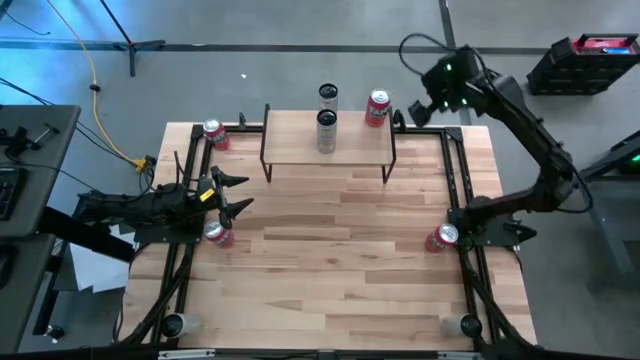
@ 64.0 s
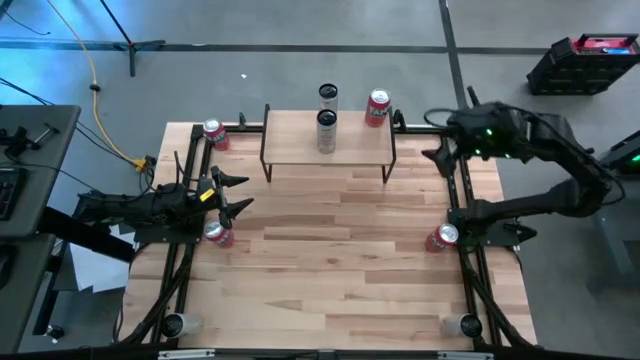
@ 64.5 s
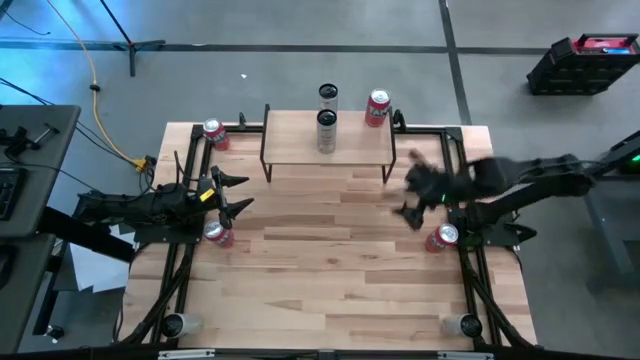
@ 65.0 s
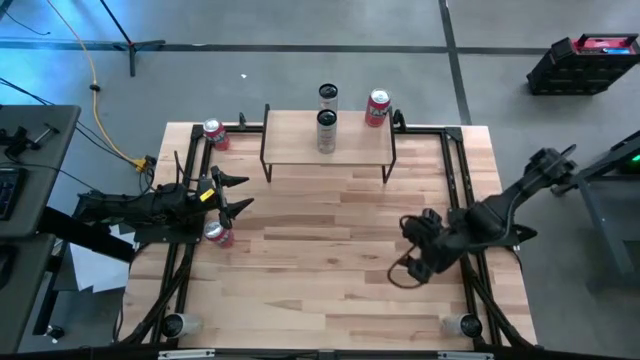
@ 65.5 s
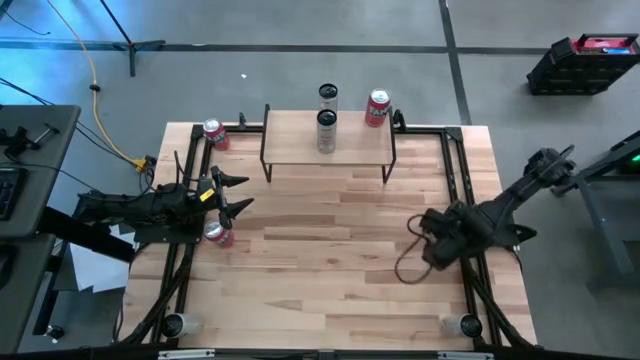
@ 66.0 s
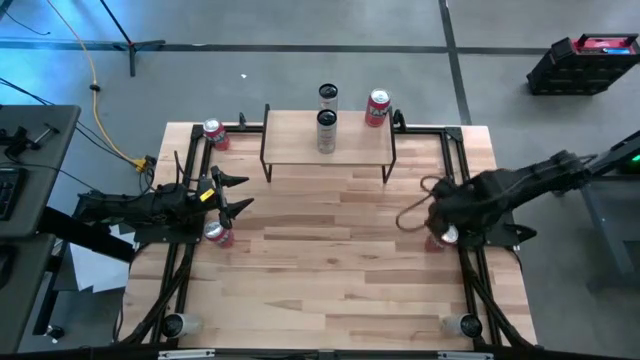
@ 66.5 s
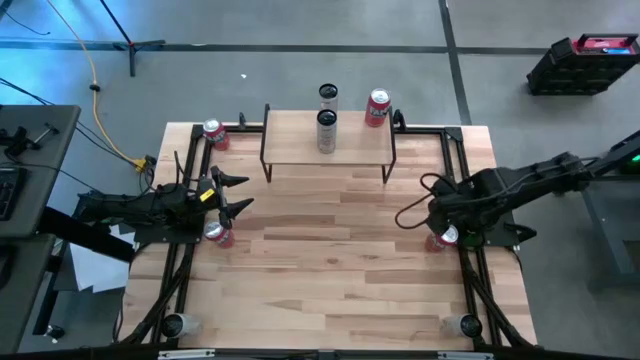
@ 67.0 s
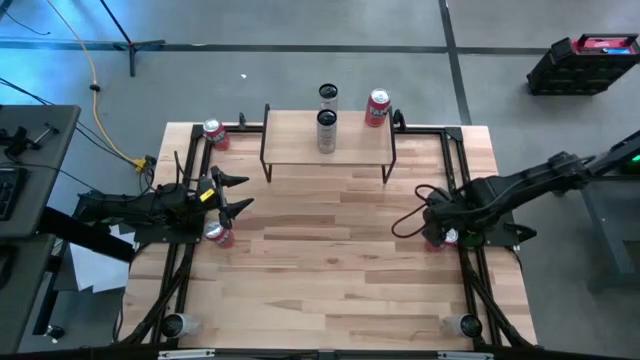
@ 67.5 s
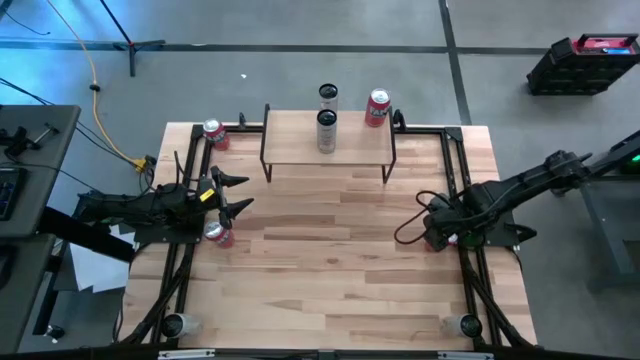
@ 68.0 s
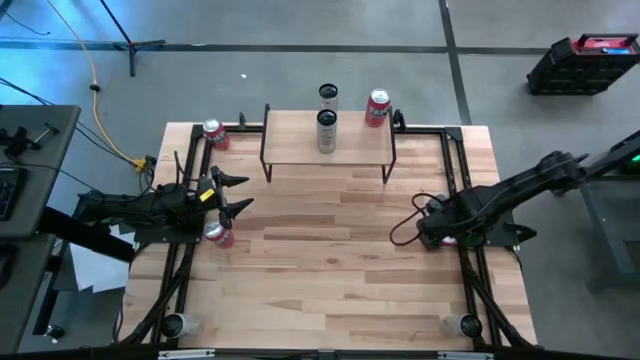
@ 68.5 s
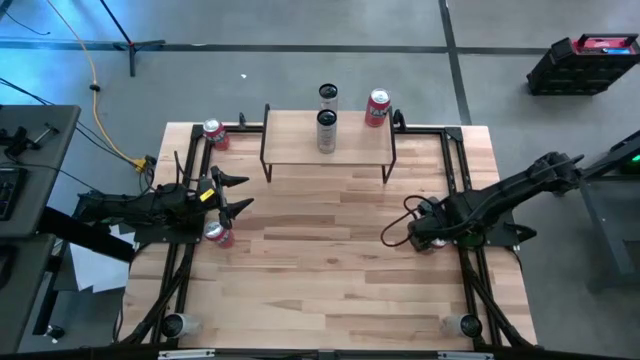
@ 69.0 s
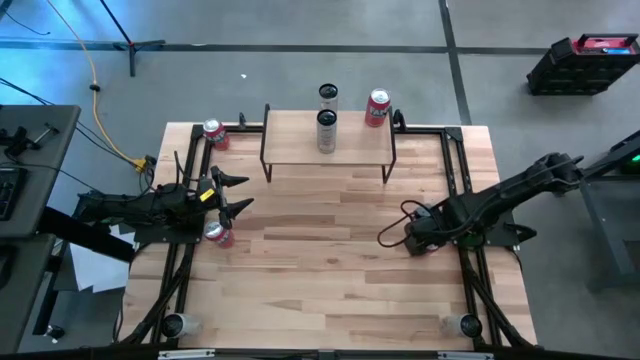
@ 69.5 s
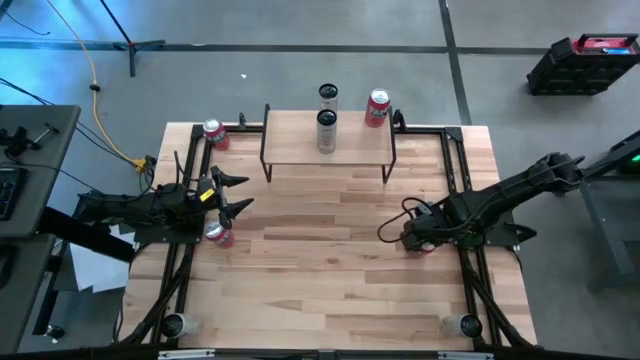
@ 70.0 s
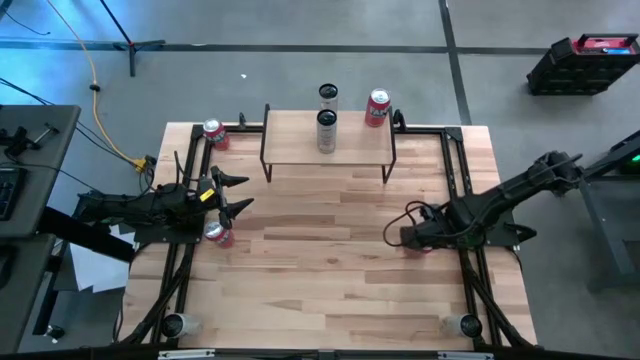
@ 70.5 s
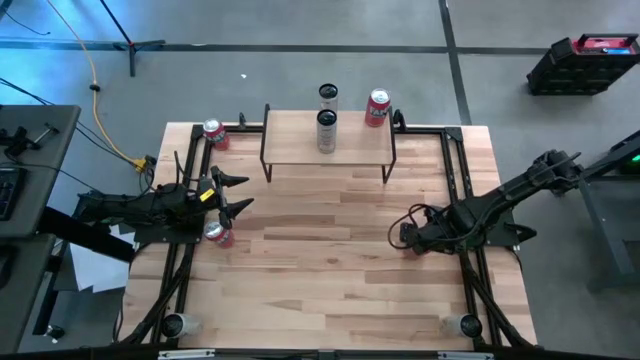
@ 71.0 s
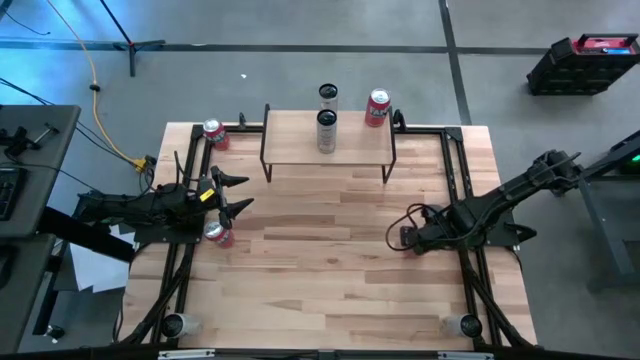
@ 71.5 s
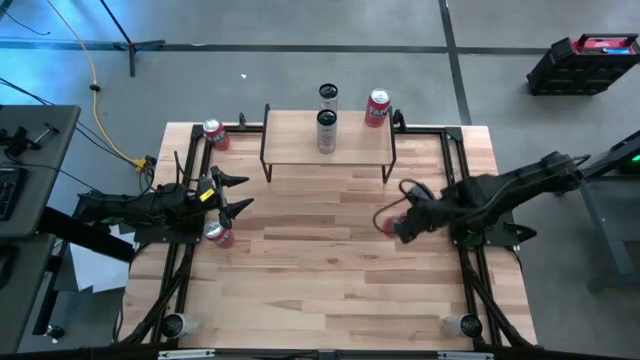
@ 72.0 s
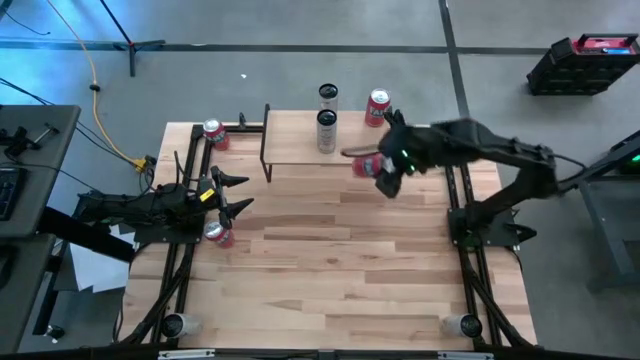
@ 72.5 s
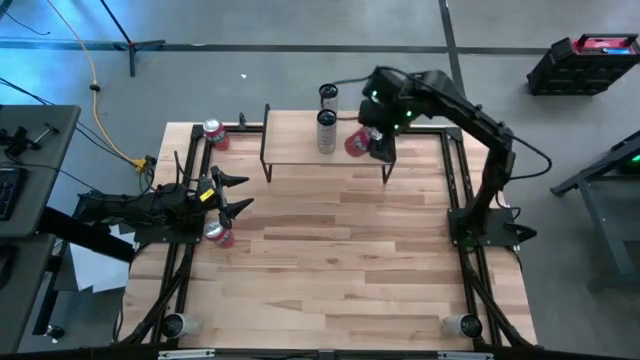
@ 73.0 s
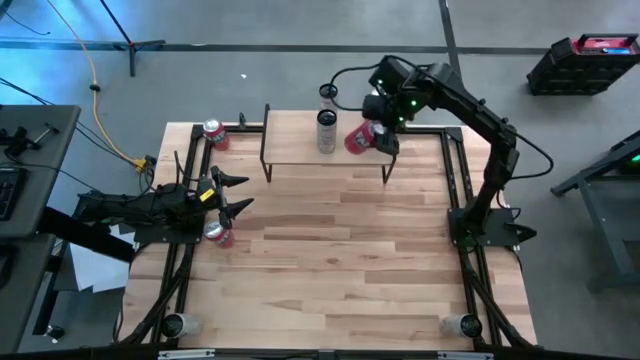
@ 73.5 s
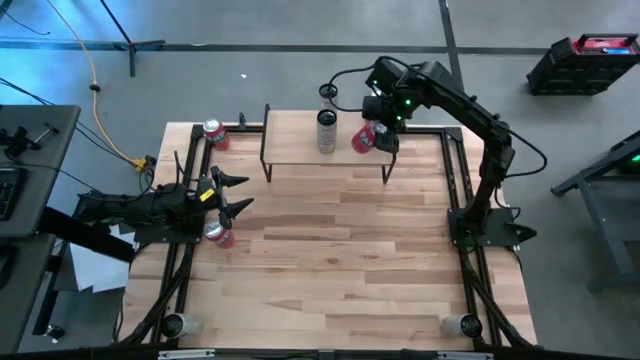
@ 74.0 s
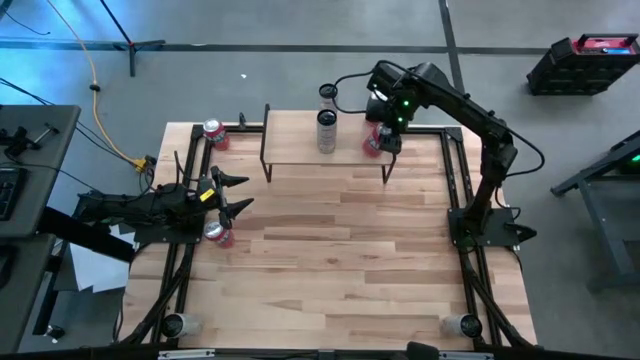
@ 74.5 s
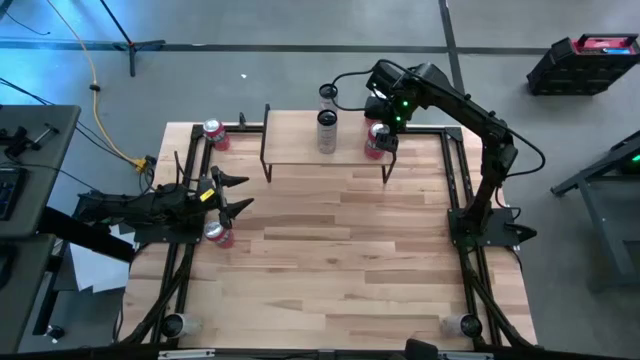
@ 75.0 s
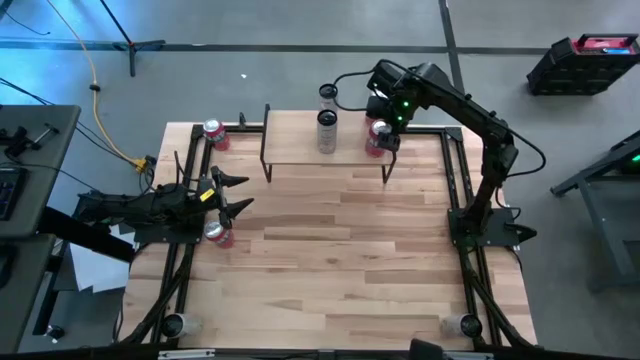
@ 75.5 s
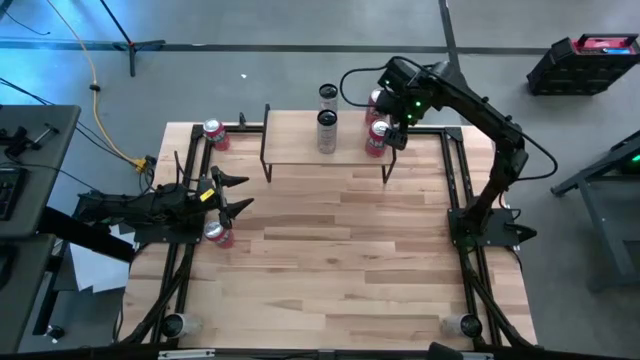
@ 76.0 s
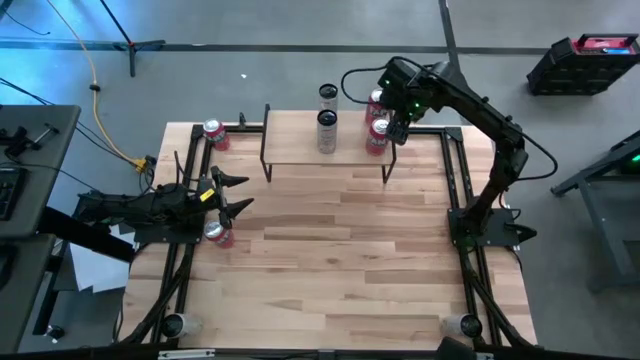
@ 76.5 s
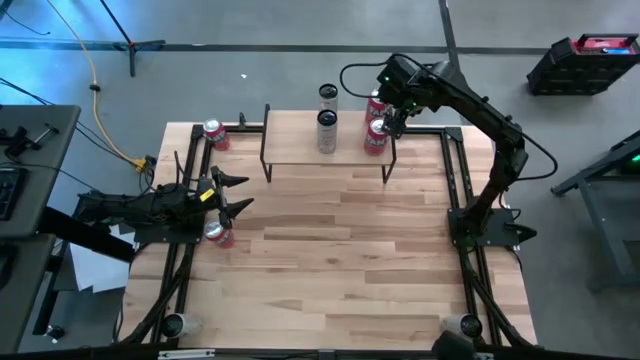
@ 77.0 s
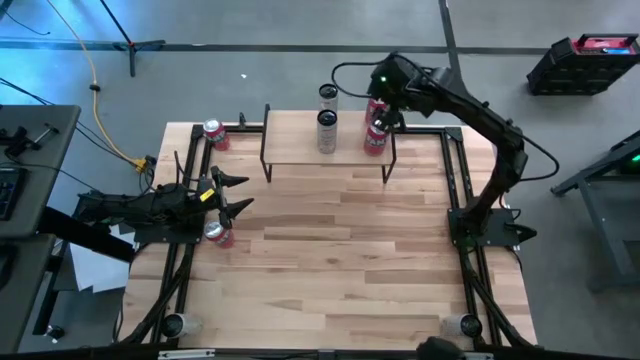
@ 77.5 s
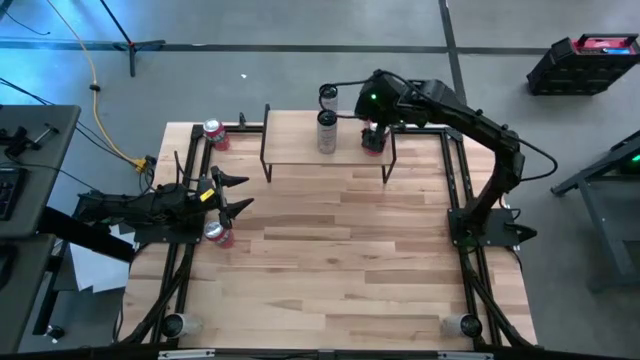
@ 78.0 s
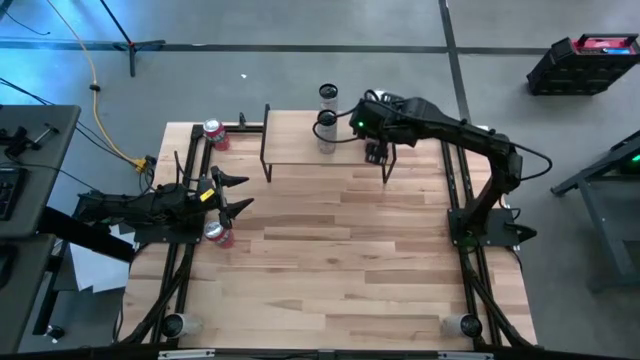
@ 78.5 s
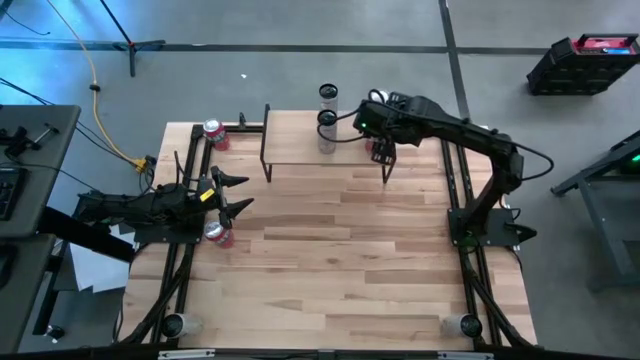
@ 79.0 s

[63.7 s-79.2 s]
Task: Place canned beverage on shelf
Put the right red soda can aligned with the other red soda can on the shelf

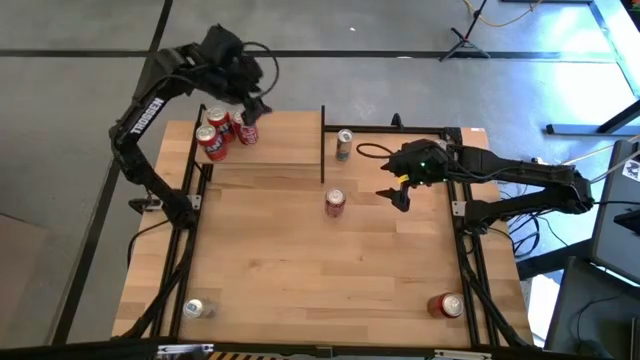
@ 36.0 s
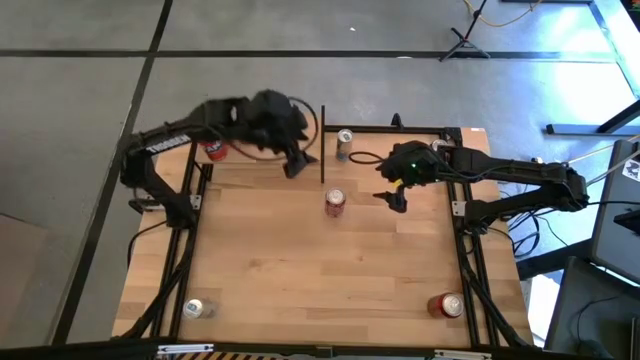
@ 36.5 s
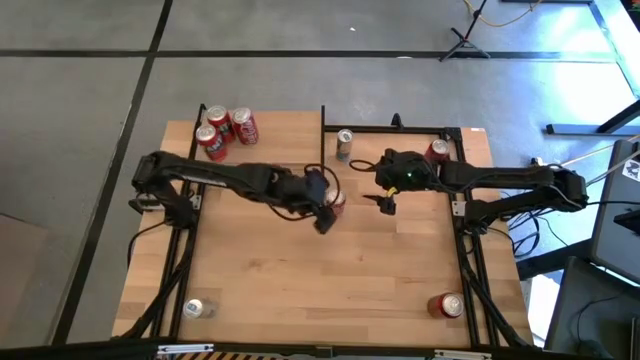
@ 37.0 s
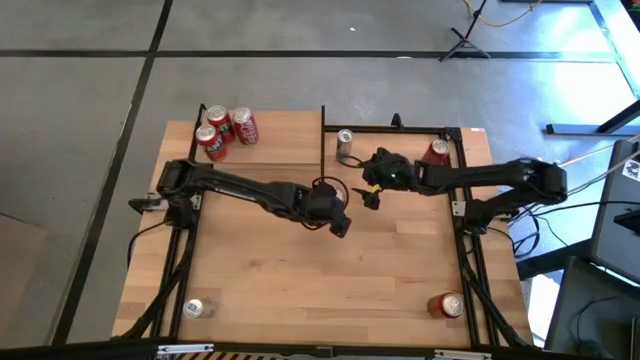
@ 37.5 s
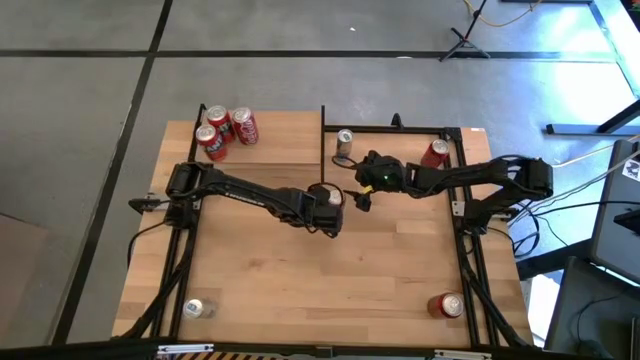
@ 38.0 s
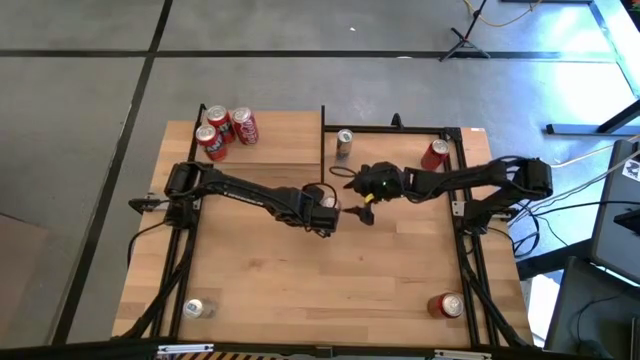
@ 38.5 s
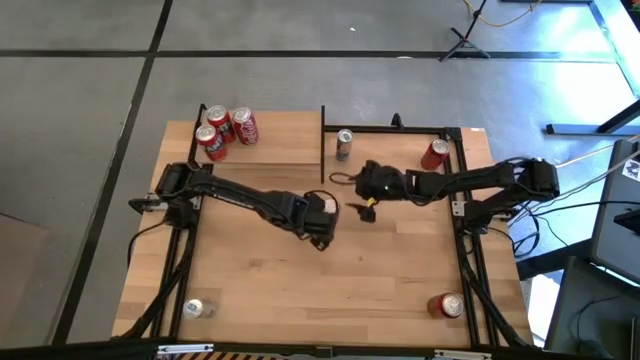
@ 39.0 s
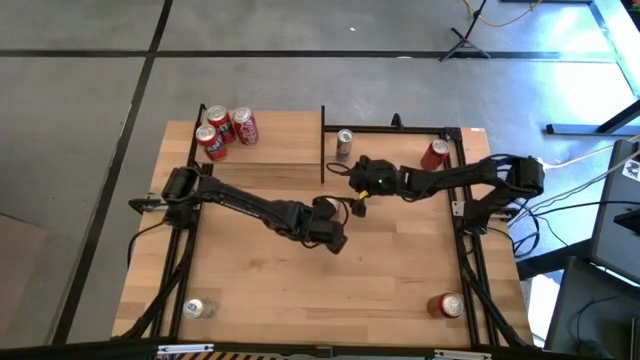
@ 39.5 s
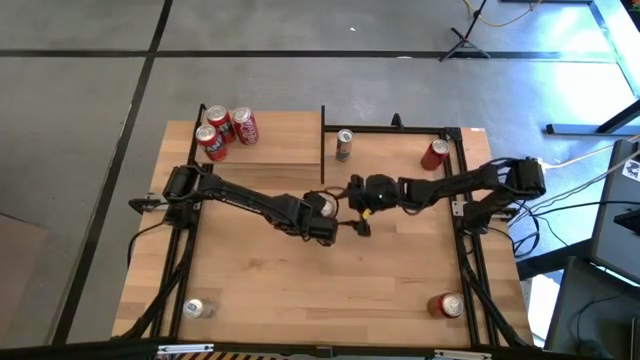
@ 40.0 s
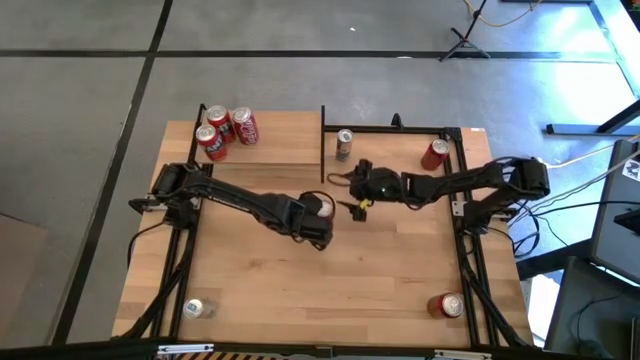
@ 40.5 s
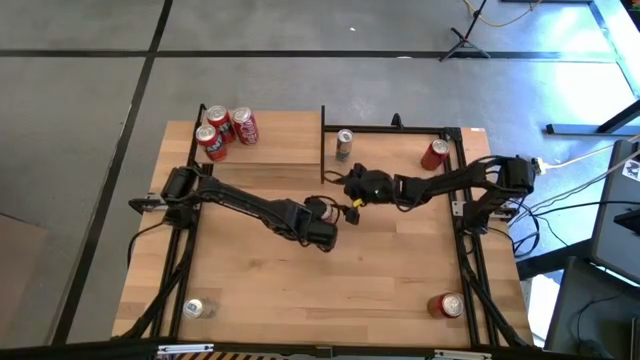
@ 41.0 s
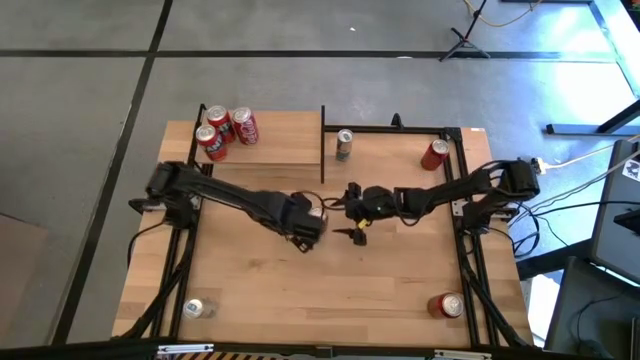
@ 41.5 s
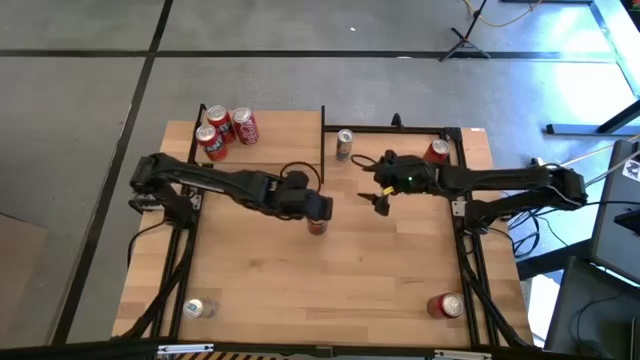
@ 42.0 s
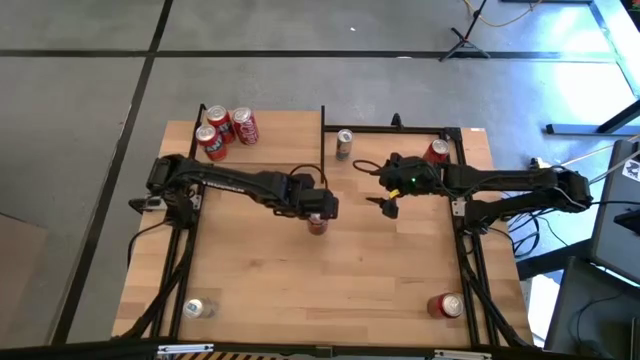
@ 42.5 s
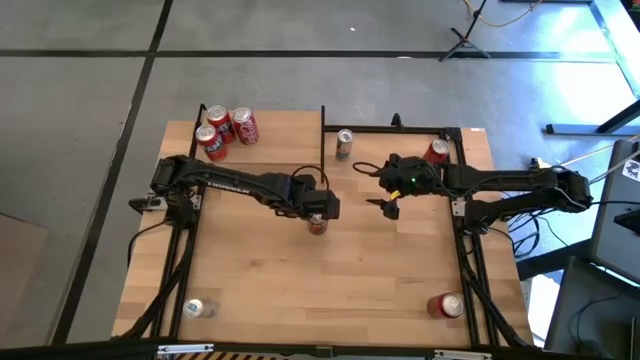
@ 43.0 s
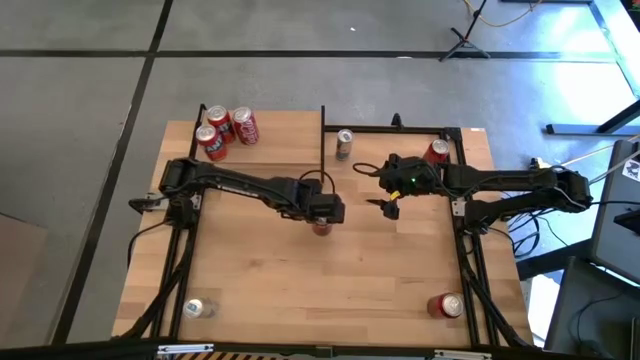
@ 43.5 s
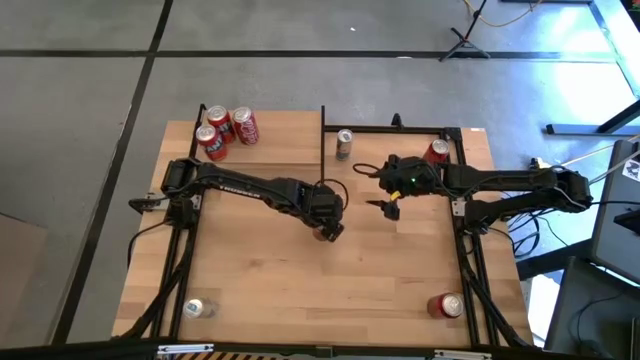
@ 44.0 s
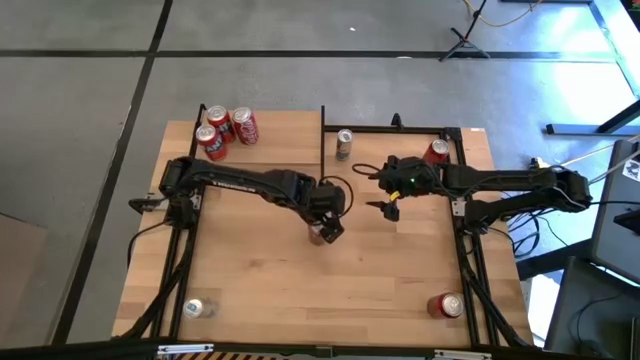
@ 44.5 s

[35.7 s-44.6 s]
Task: Place canned beverage on shelf
Put the red-white soda can on the shelf aligned with the other red-white soda can
